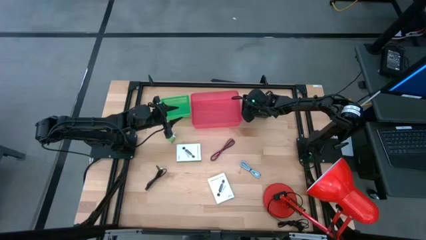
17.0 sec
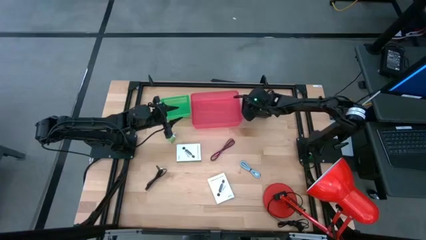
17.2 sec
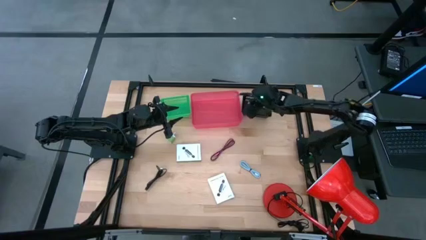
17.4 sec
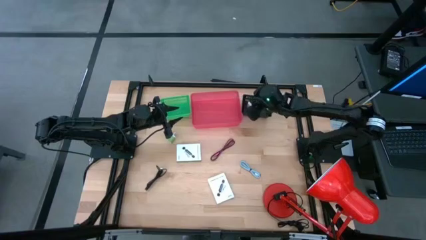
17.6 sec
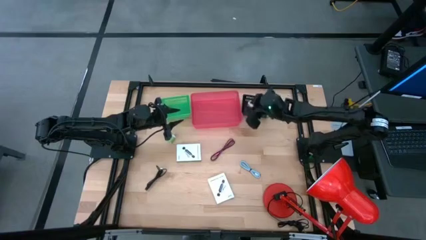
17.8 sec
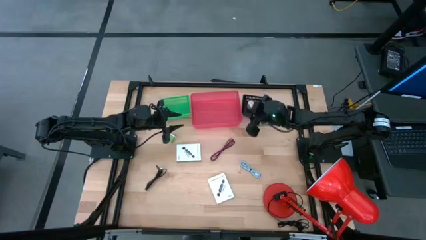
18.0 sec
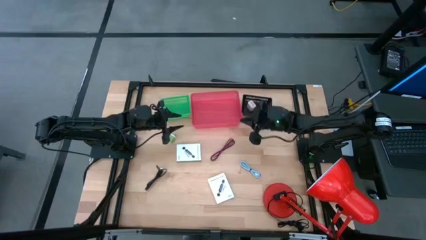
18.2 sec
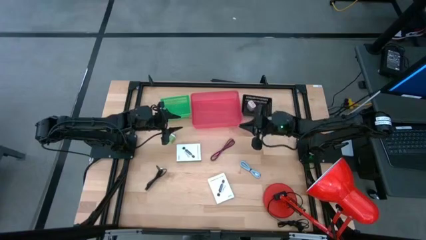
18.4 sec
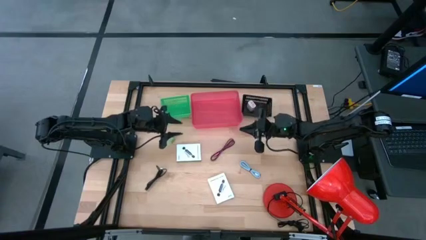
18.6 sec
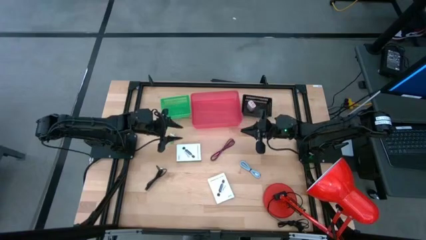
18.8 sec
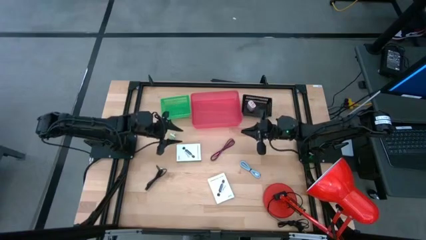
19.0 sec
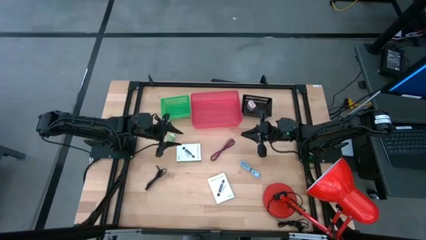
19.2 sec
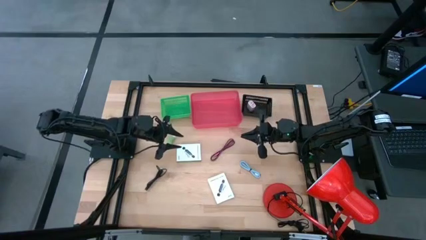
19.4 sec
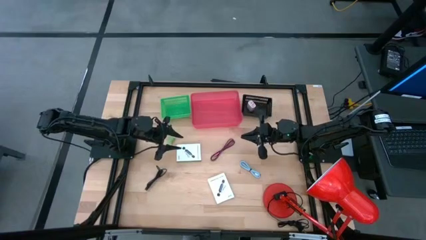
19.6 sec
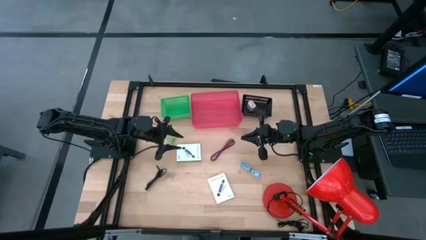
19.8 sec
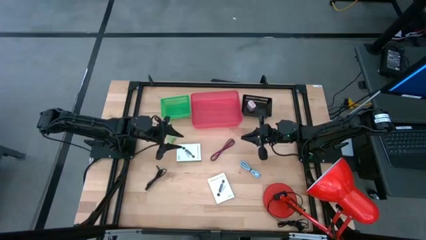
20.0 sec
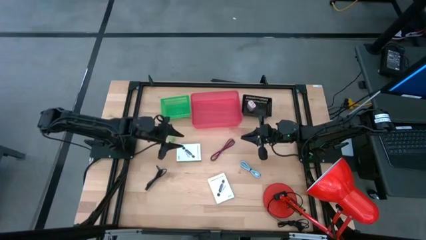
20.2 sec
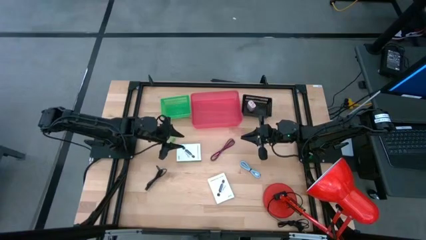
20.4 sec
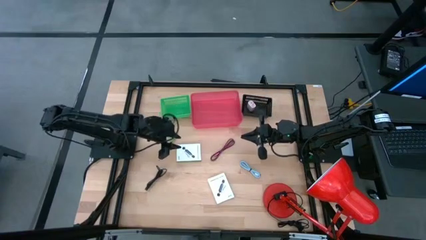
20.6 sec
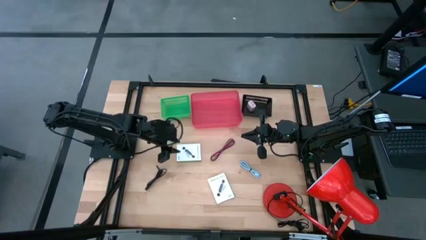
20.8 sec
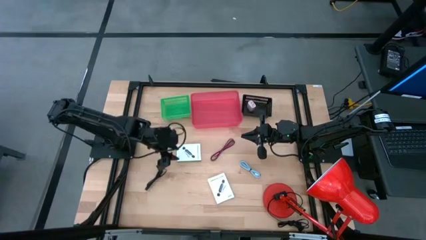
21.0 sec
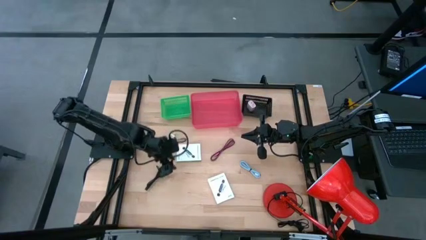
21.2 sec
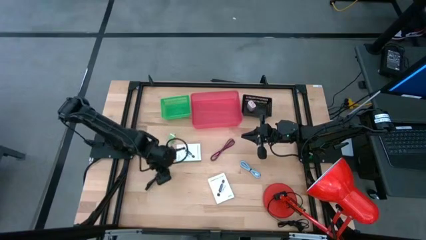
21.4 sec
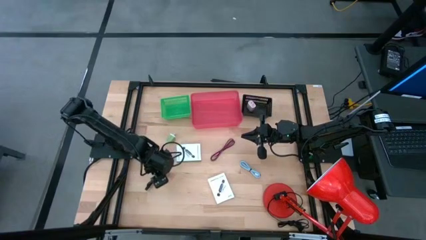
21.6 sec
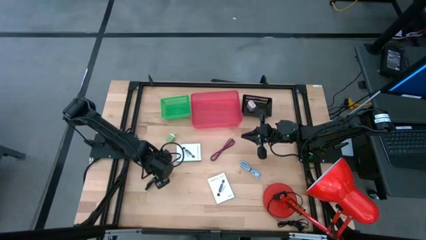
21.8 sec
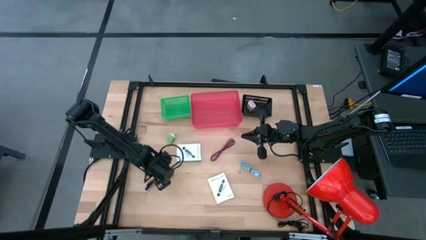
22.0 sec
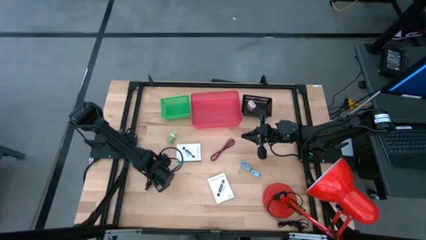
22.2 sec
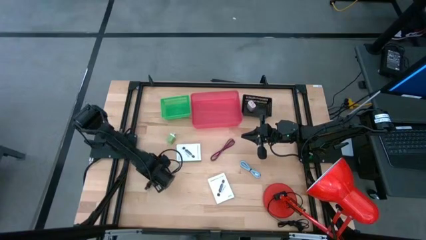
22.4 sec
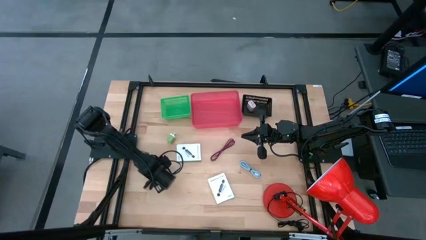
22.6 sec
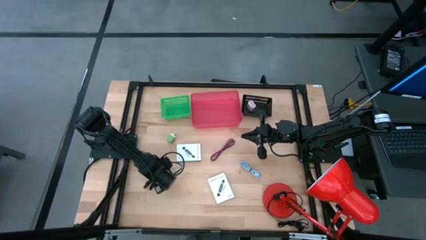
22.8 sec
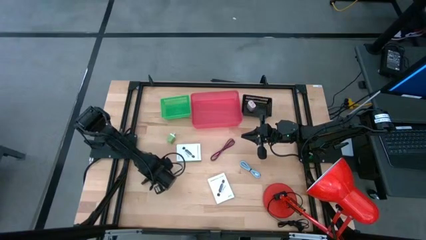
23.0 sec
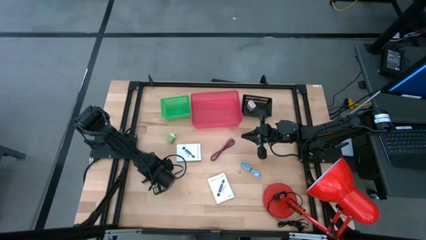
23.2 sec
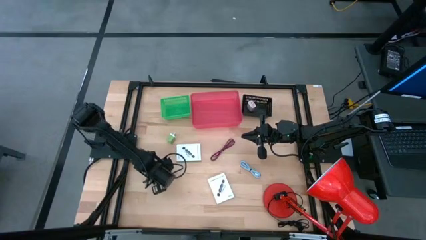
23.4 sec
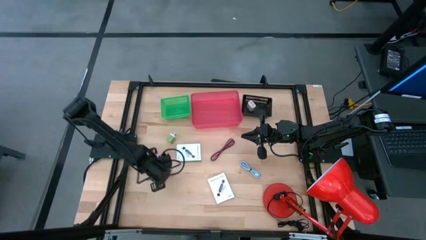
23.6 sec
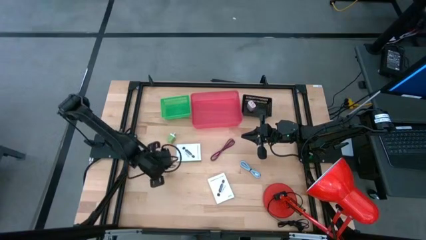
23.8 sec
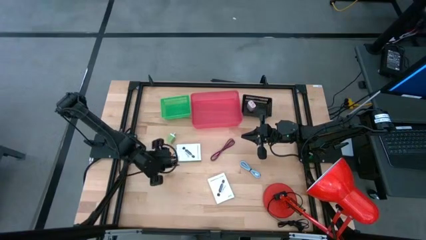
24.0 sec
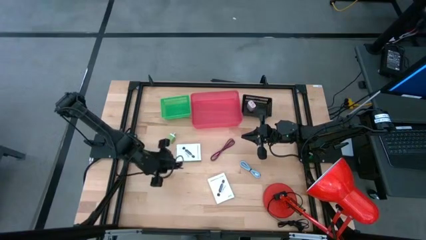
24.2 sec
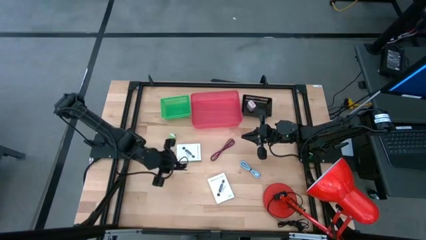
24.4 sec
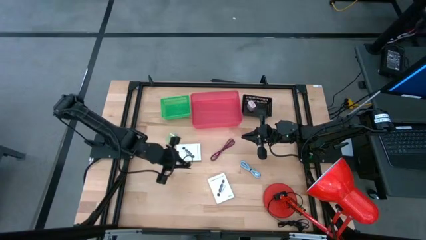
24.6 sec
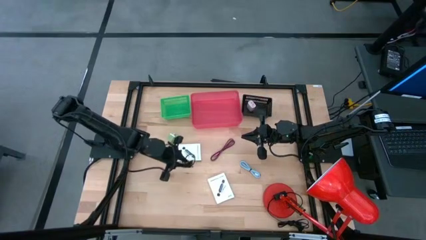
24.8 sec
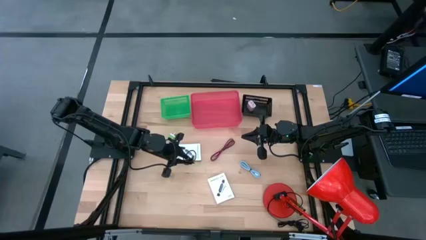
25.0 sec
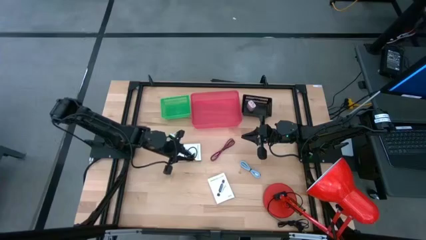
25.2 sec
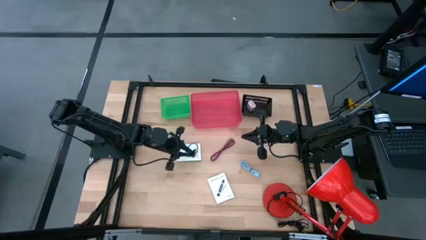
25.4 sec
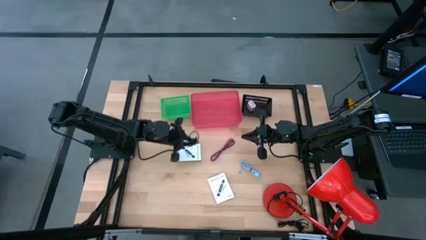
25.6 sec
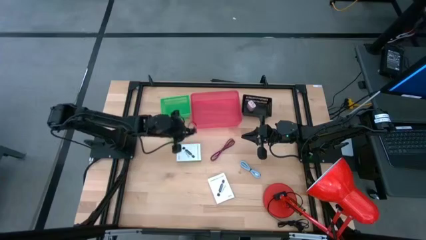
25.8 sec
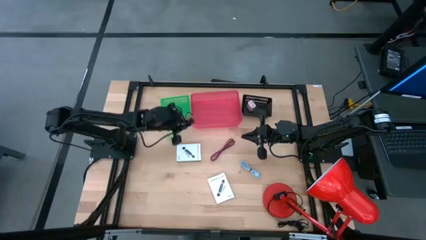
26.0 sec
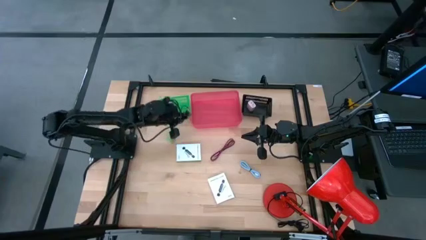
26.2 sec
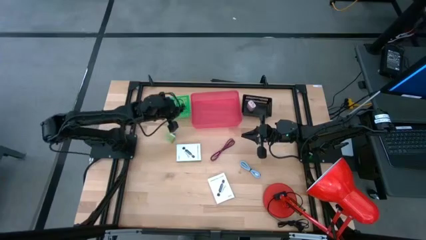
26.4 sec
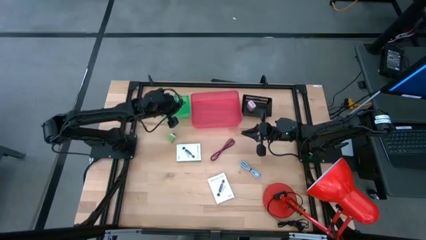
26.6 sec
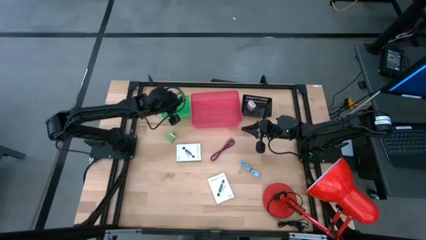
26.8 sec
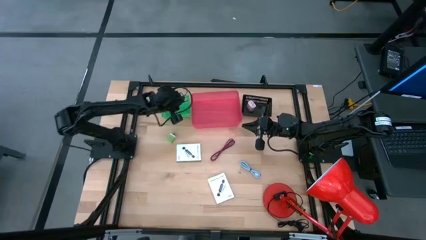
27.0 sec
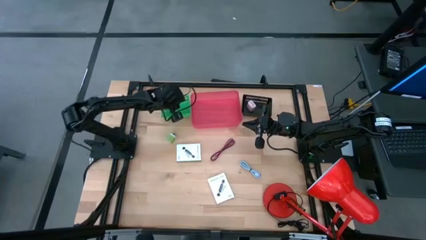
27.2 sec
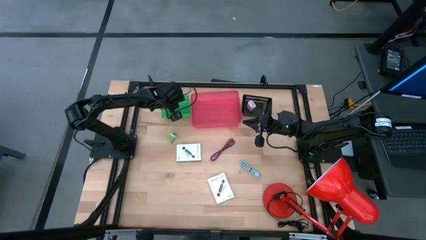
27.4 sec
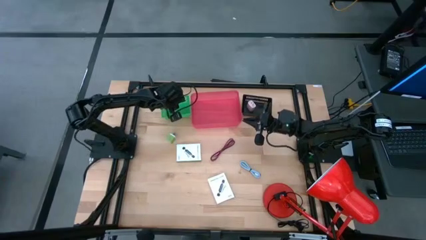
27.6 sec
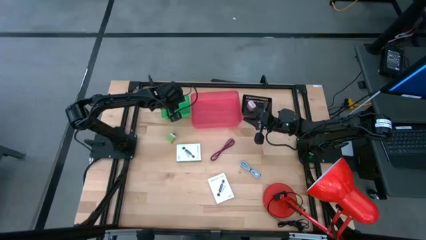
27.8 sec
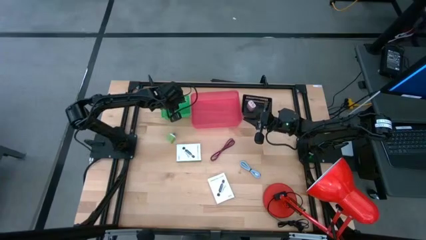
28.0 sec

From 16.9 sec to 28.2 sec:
Task: Pick and place items into bin
Put the black charger cable into the green bin
